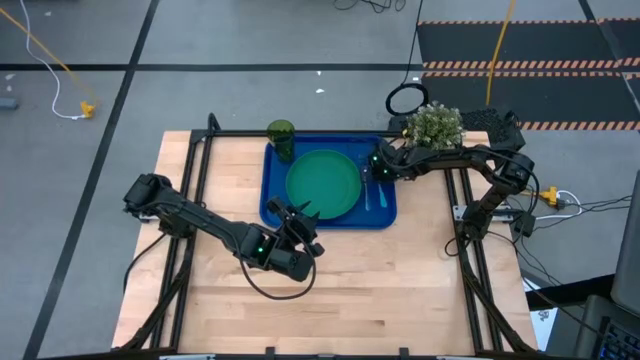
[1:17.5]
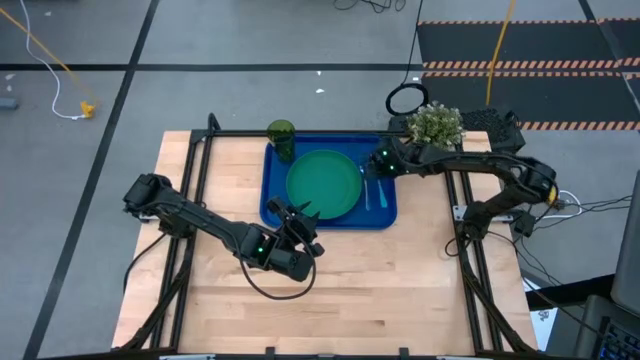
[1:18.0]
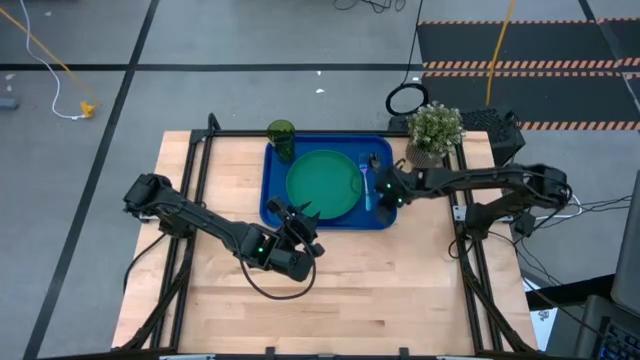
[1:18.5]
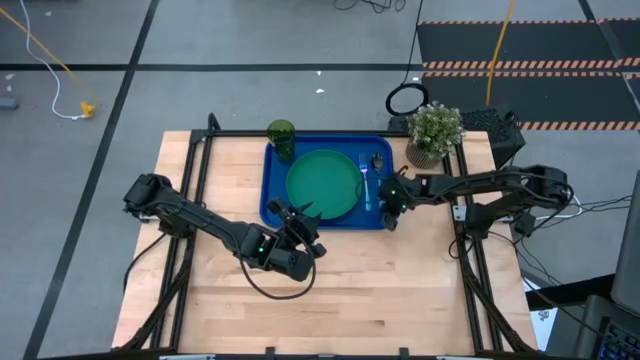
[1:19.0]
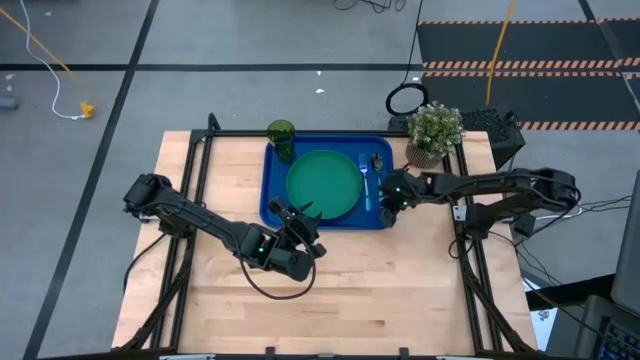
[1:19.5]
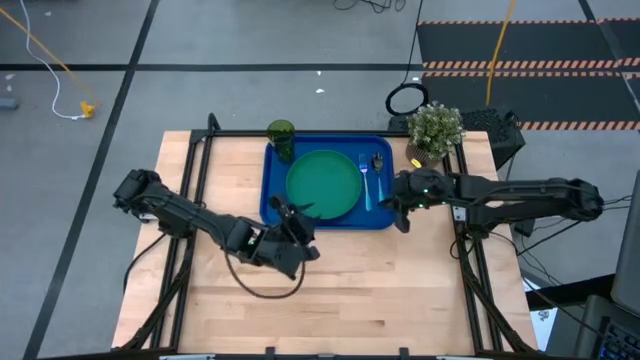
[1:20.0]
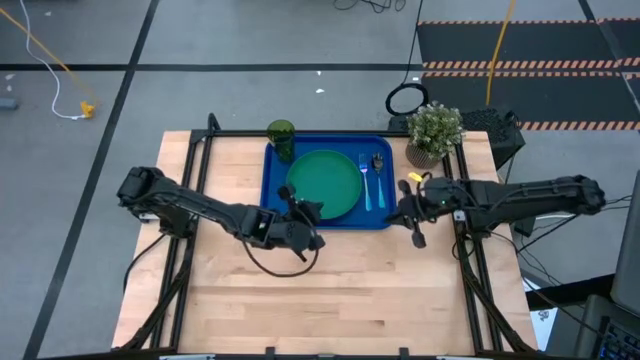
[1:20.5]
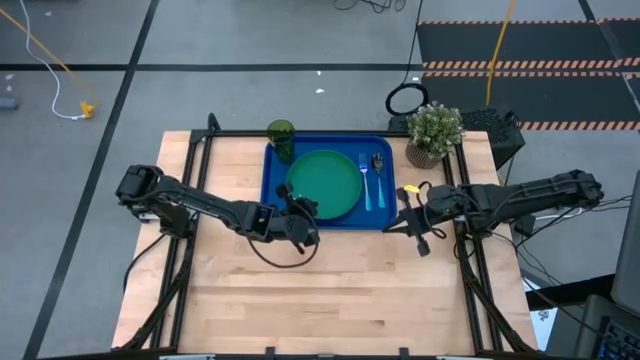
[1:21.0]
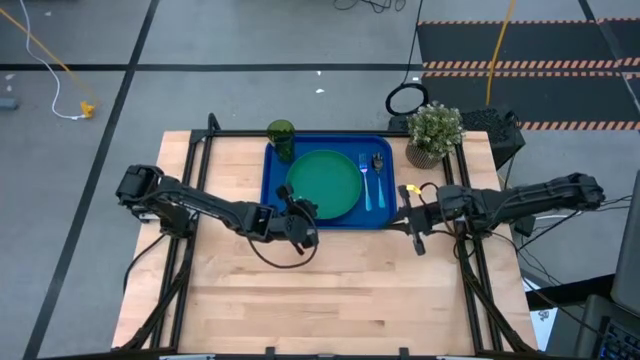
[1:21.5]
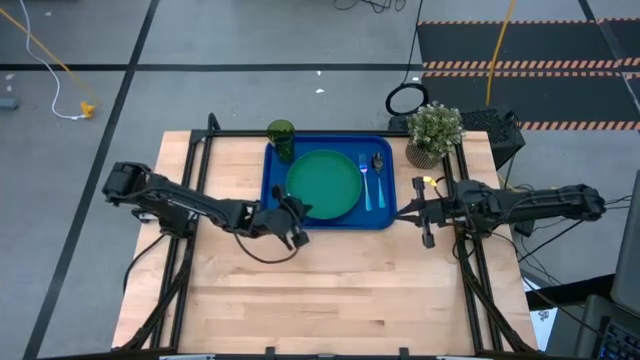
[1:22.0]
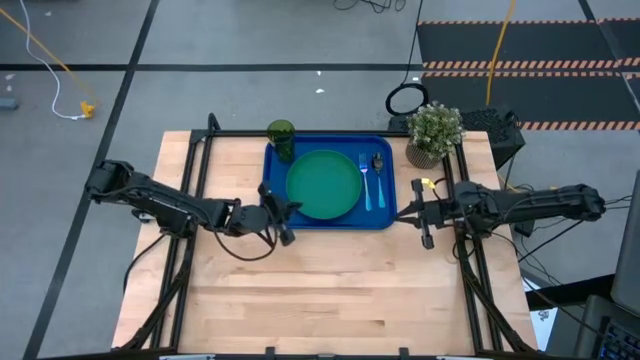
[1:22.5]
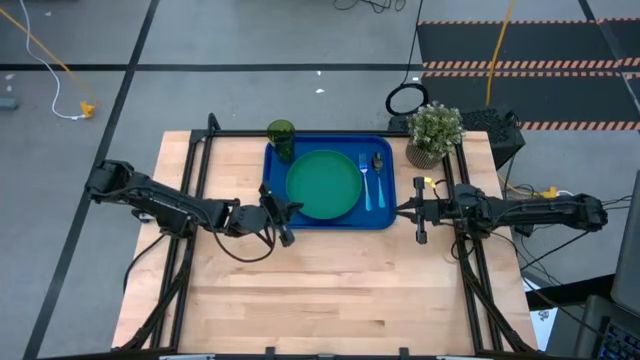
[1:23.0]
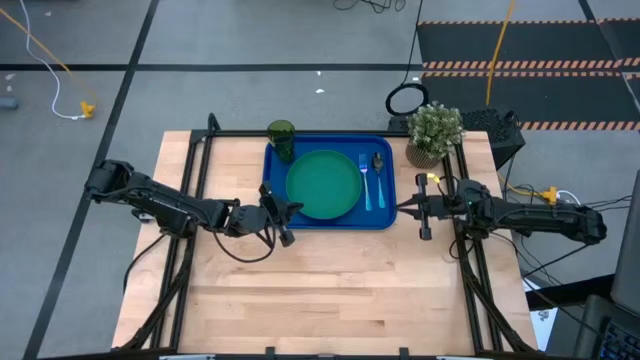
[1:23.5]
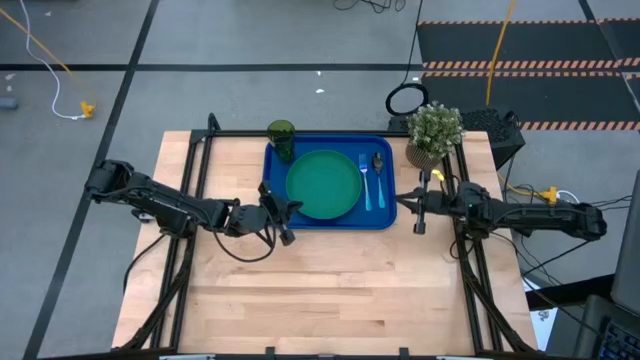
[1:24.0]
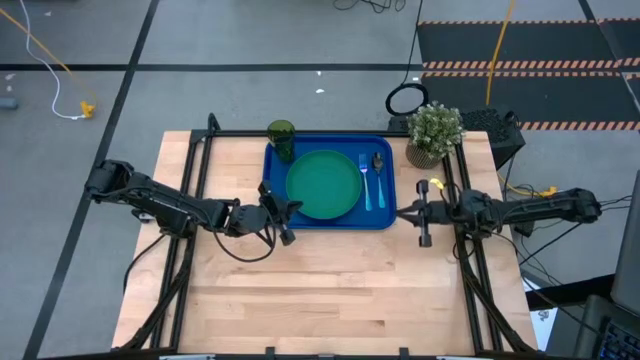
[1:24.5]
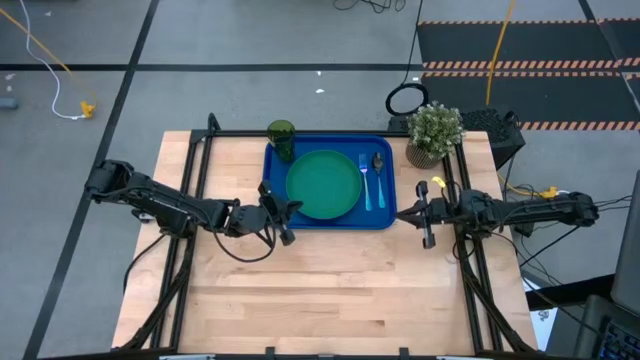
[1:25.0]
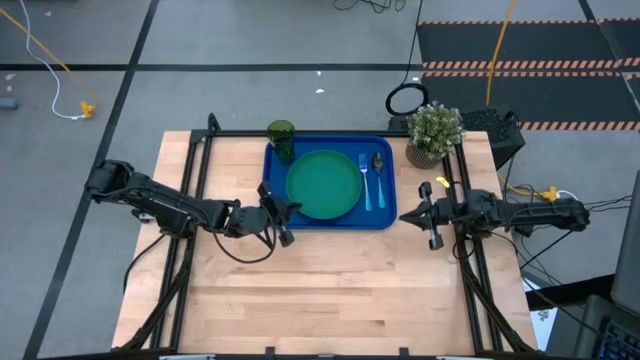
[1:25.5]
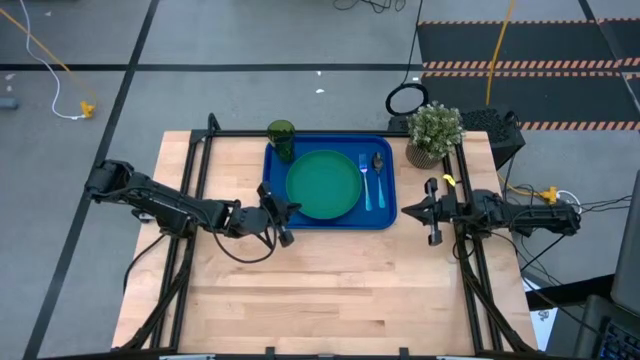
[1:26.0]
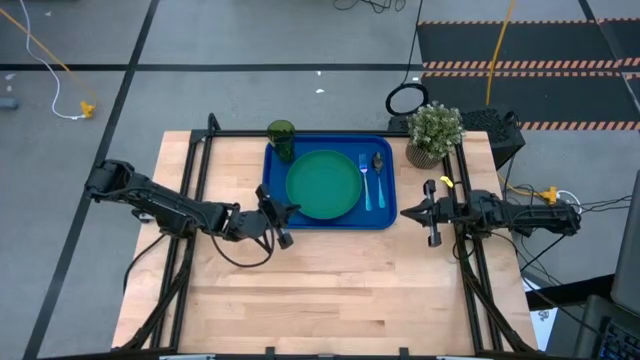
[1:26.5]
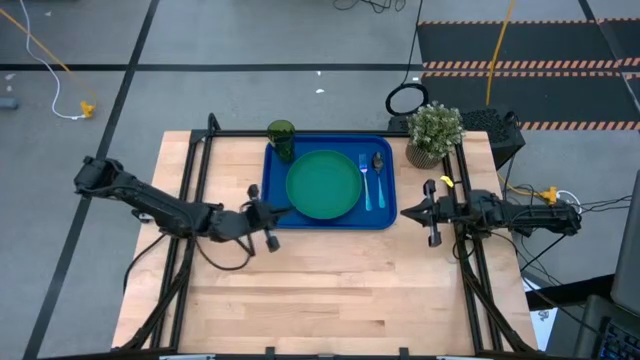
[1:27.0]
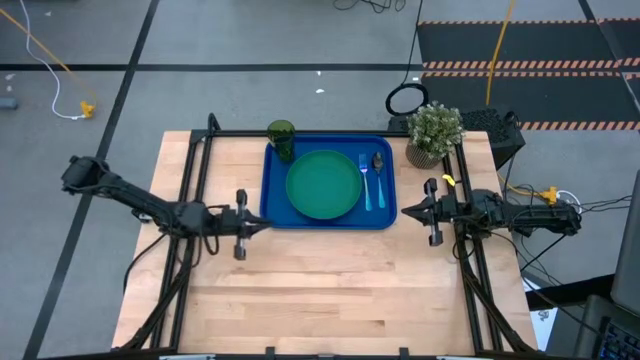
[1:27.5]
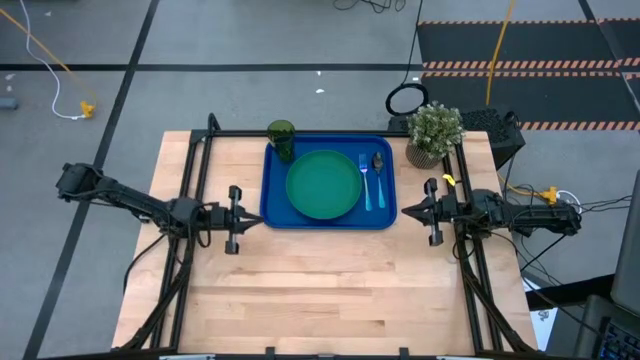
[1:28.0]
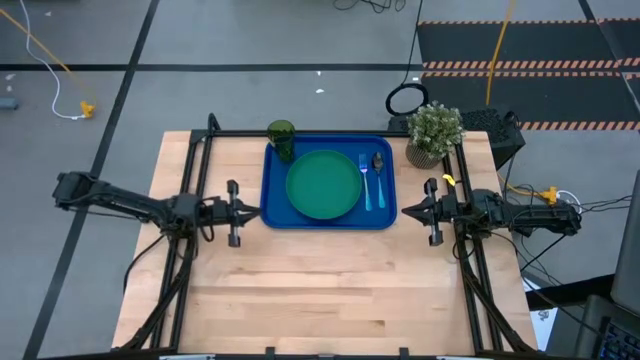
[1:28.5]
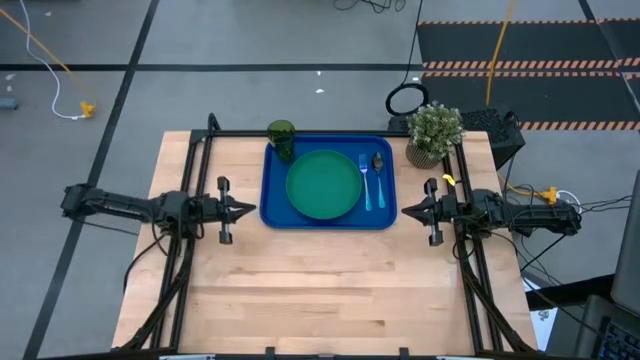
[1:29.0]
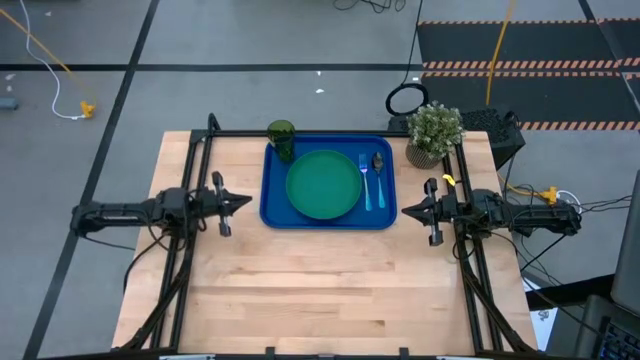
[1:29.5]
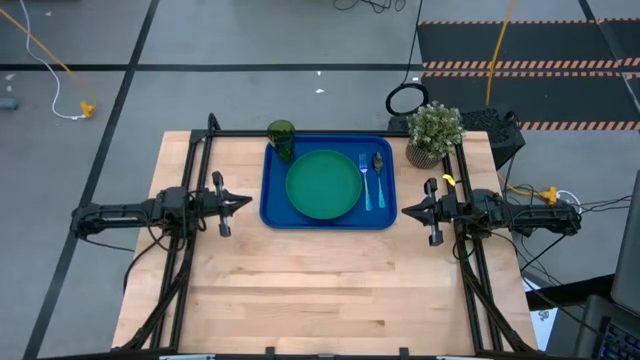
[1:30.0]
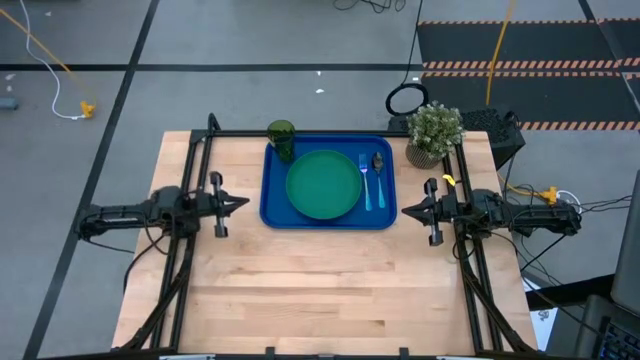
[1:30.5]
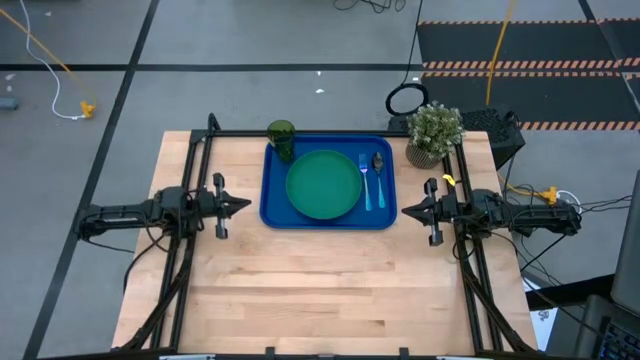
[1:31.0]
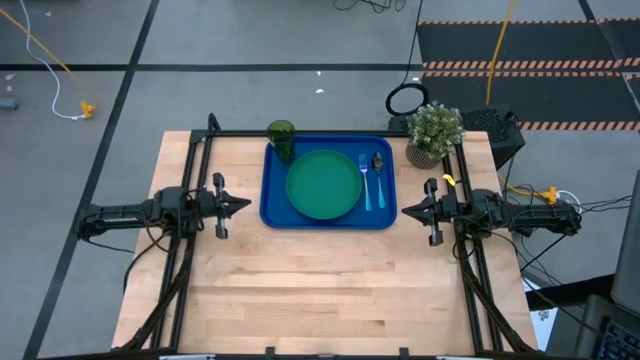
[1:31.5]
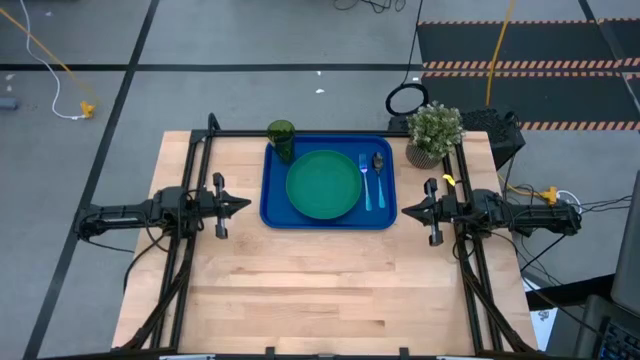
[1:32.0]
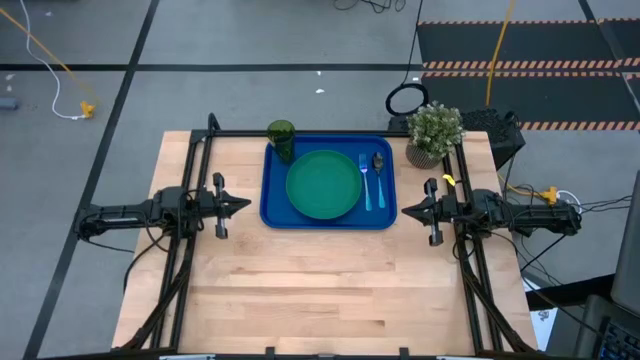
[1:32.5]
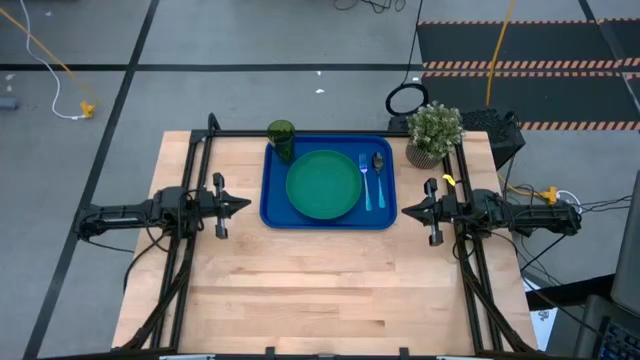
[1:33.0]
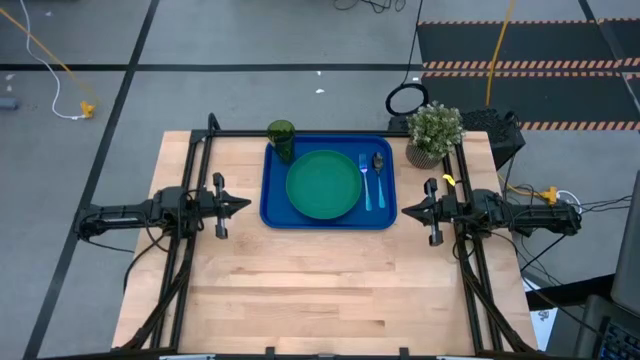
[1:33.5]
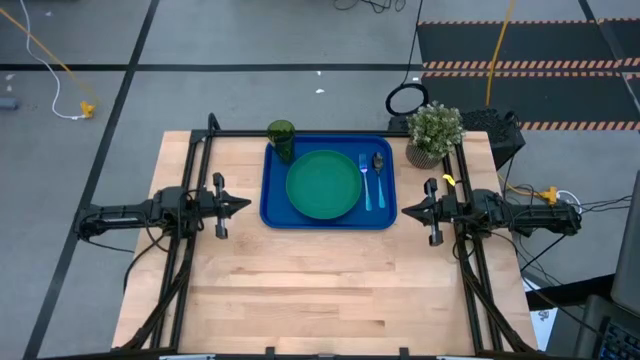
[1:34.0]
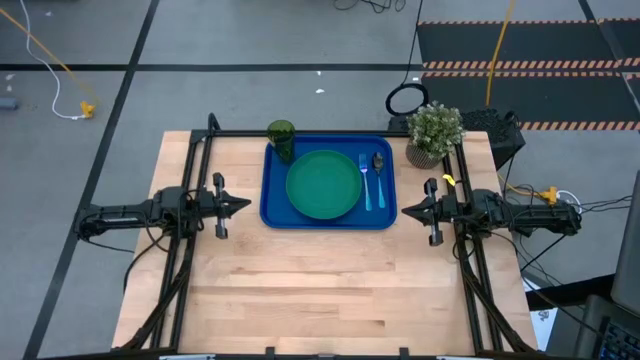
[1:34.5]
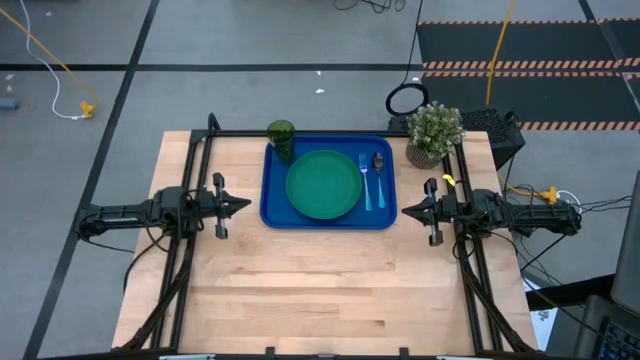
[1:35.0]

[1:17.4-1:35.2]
Task: Pick and place plate/cup/fork/spoon on tray
Return to Home Position

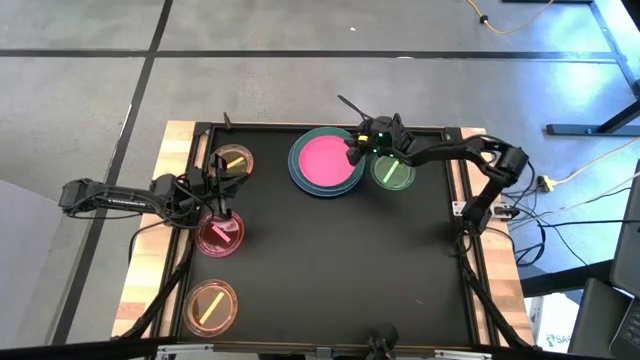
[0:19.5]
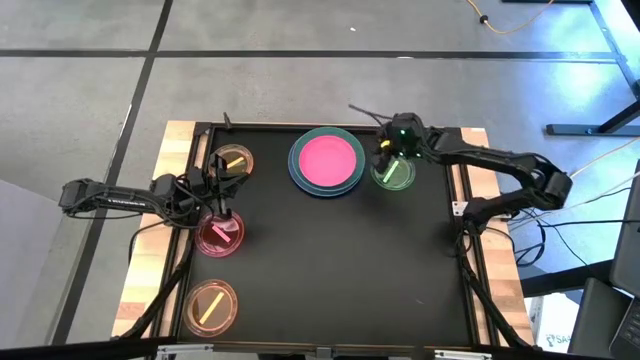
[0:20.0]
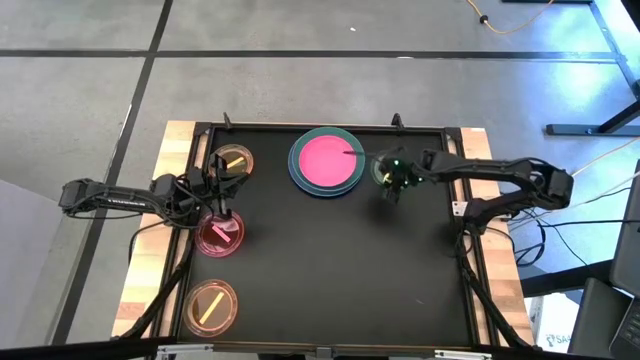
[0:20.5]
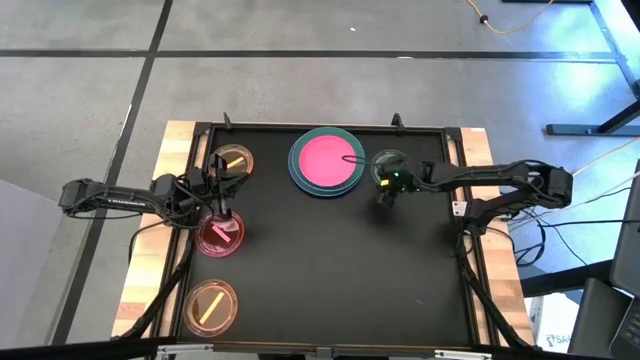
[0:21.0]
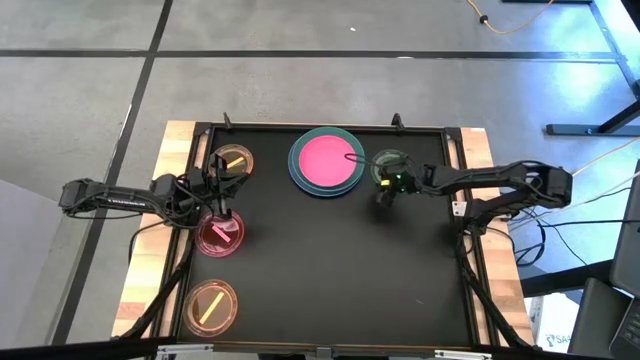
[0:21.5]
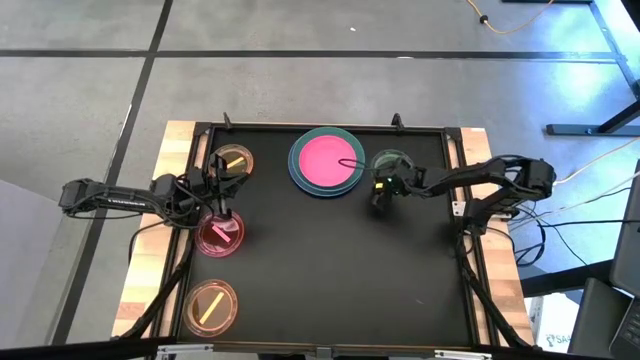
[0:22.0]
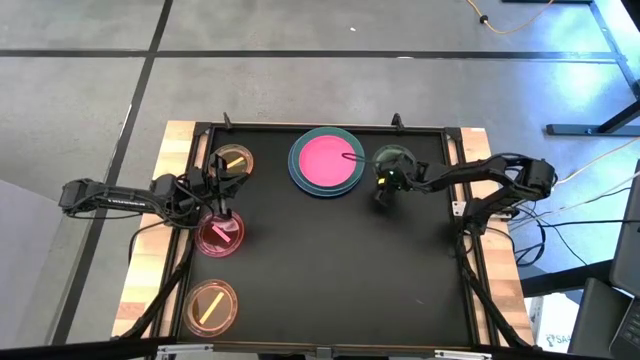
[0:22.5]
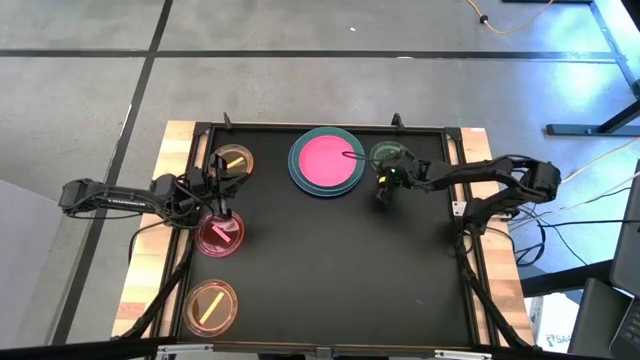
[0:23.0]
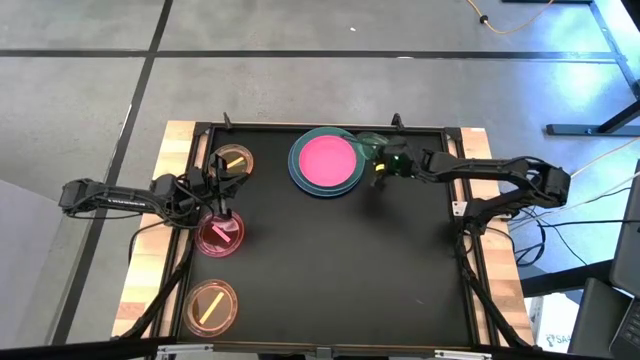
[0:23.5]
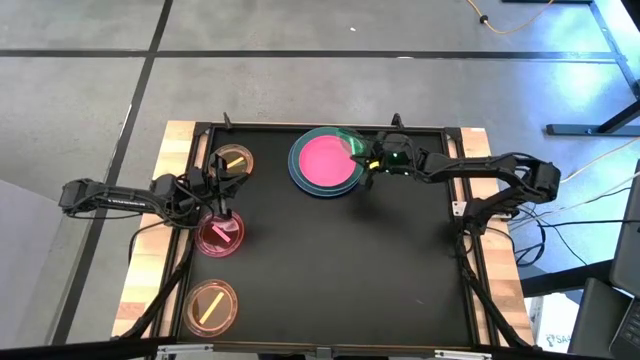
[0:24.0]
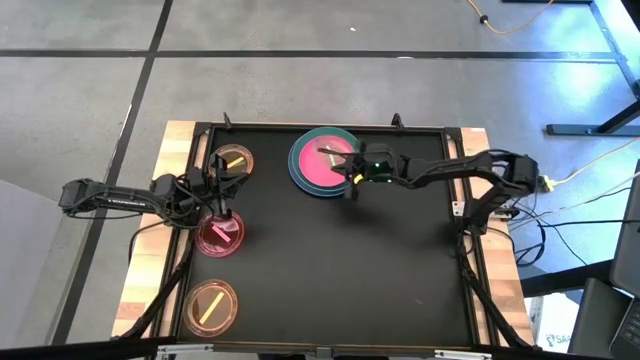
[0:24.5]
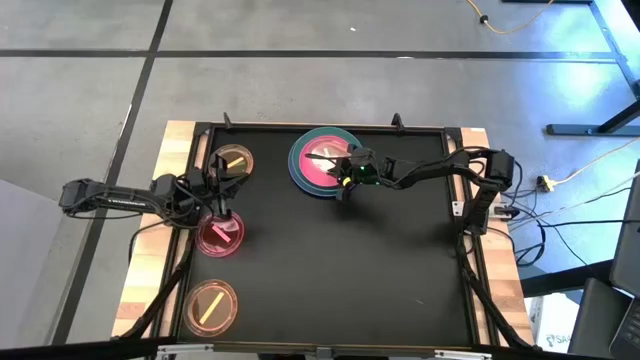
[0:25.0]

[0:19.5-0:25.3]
Task: Stack plastic plates
Stack the light green plate on top of the pink plate
